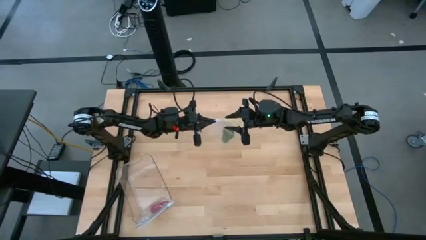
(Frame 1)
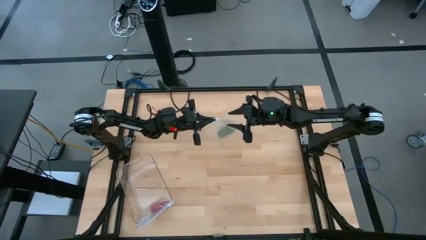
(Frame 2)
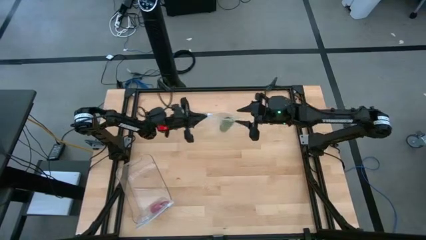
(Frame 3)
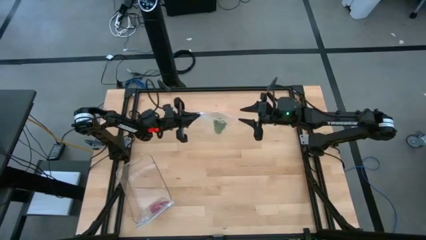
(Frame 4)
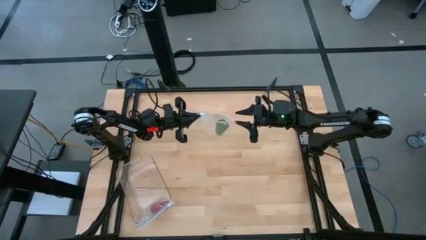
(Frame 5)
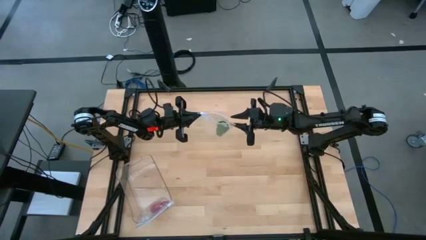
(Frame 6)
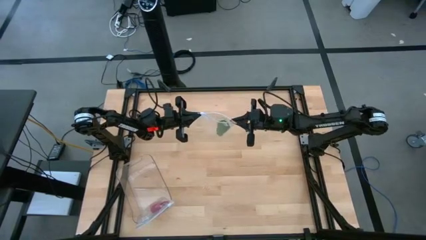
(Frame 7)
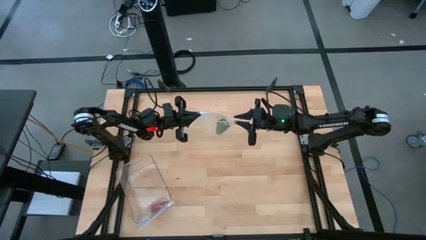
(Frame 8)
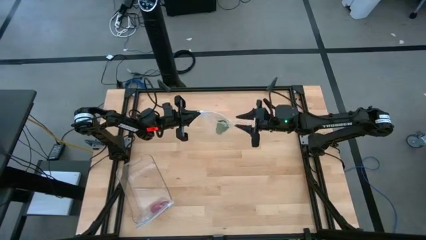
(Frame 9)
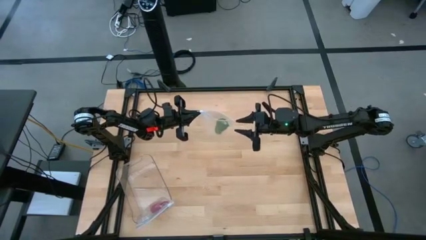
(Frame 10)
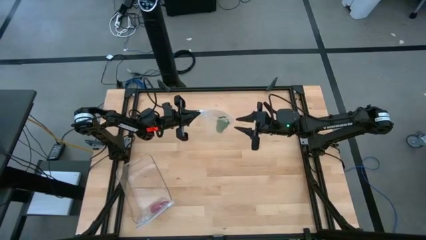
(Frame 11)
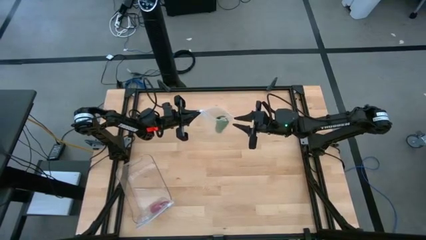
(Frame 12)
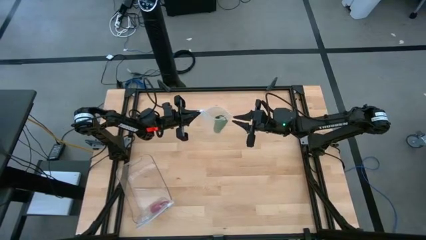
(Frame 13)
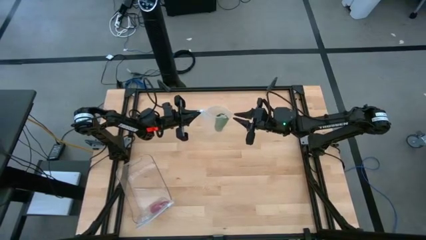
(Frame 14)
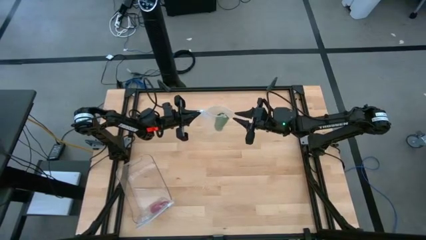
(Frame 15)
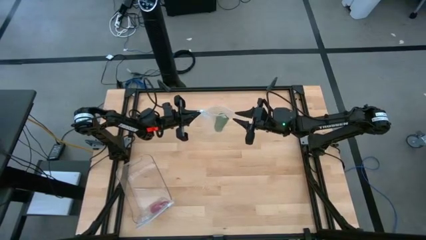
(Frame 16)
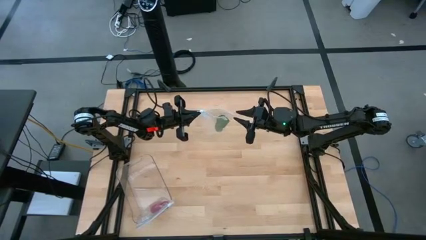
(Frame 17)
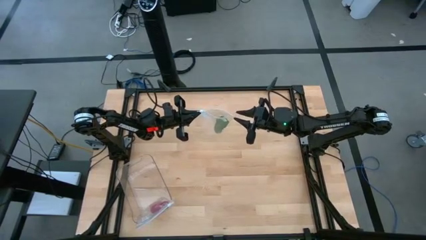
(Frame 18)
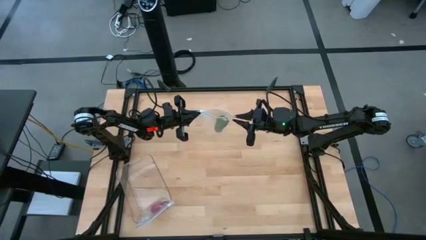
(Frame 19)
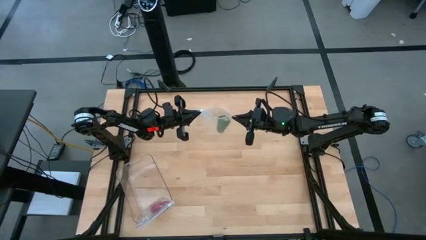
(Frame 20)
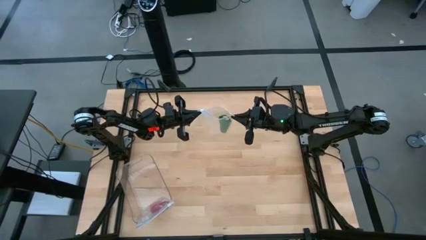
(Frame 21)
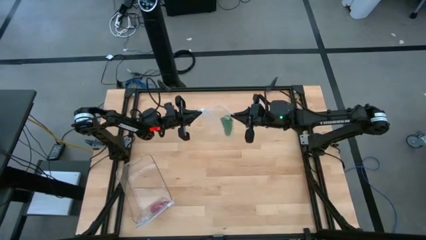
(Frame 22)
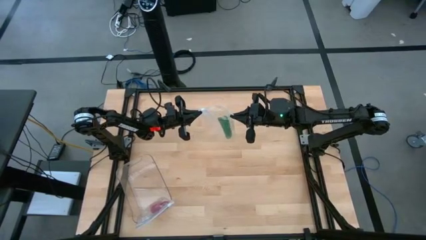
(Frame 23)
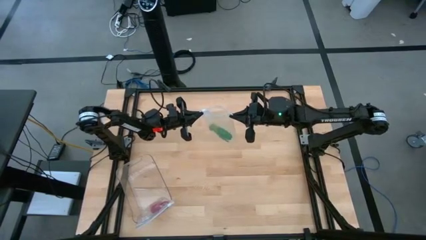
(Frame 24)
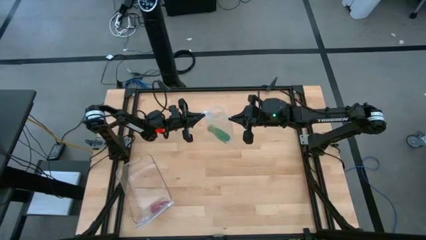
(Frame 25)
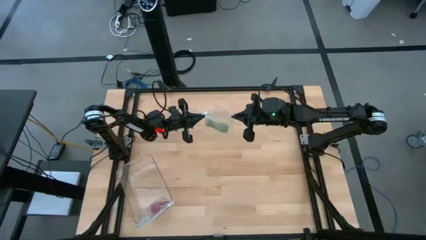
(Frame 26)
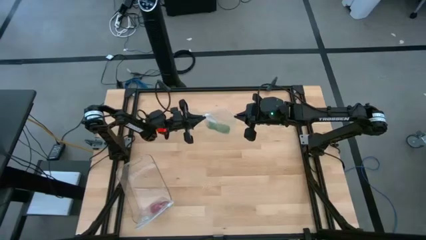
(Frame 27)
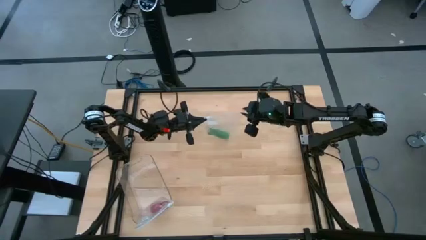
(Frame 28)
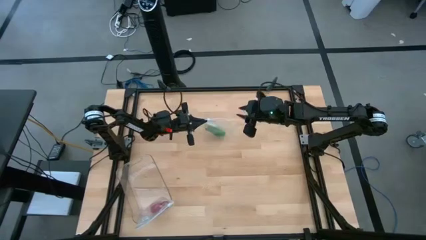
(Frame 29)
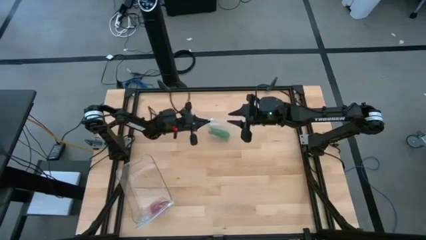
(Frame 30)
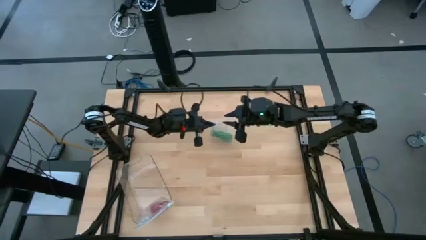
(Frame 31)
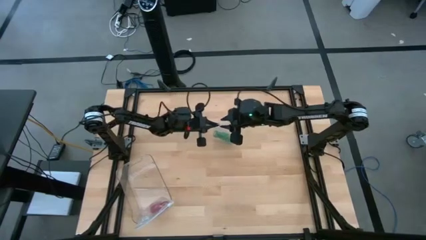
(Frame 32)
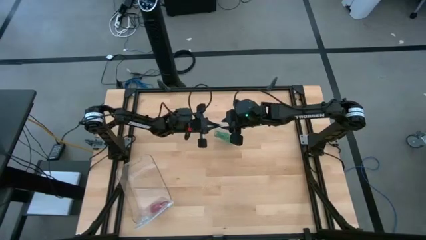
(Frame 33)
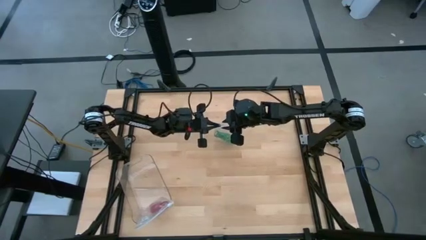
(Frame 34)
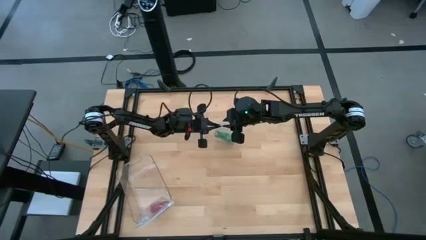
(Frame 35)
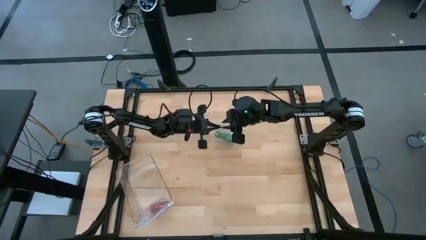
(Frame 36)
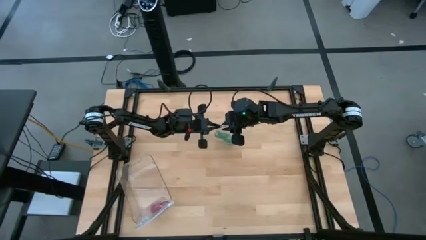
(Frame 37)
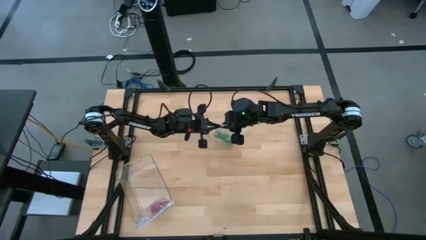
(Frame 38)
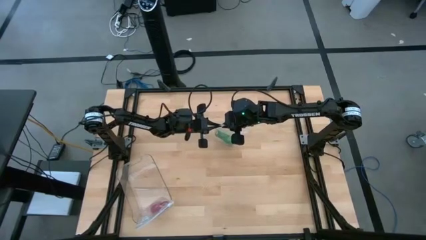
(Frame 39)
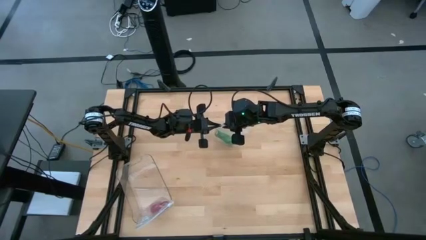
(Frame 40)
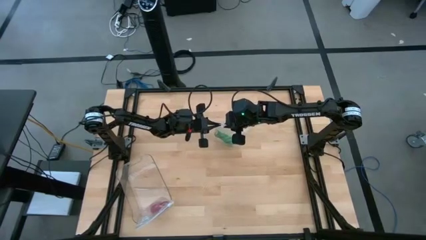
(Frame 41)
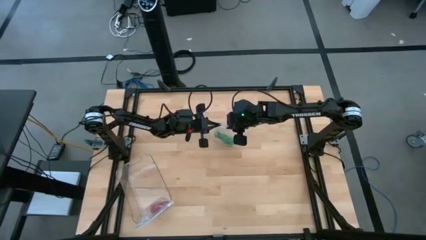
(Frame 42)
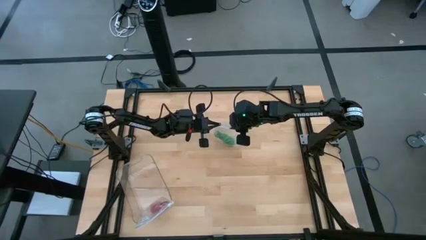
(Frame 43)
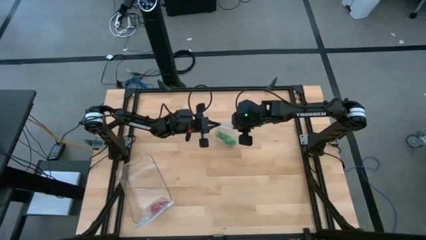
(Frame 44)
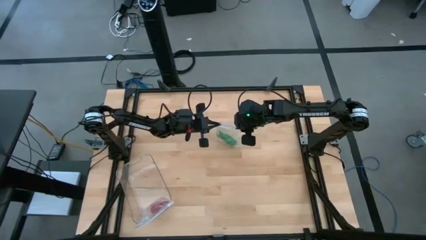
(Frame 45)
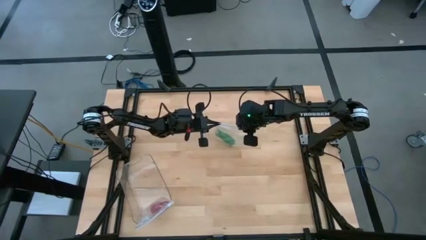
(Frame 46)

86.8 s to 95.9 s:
Task: Roll bandage
Close the transparent zip bag

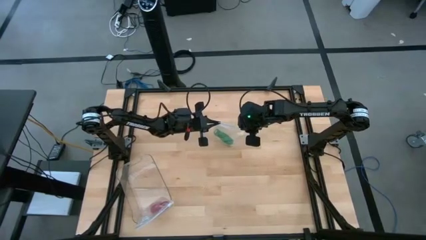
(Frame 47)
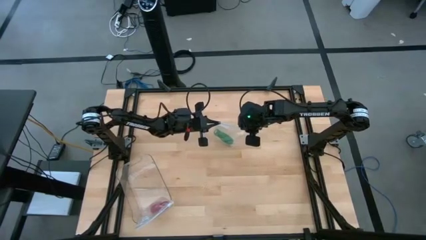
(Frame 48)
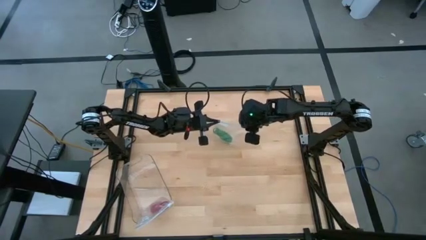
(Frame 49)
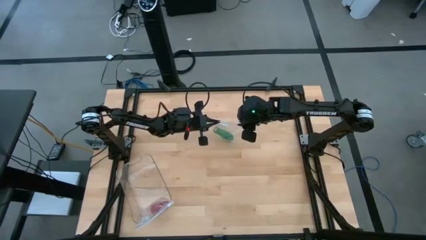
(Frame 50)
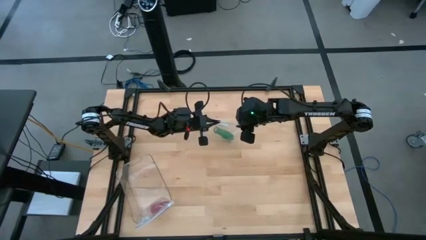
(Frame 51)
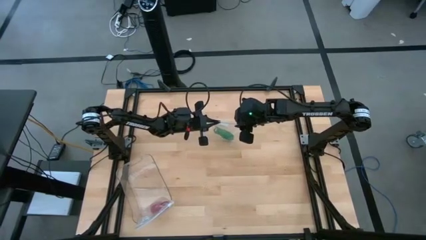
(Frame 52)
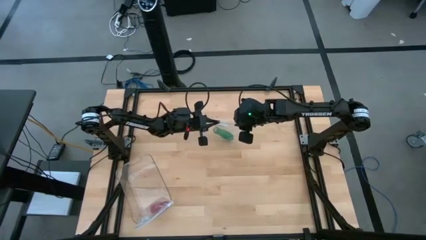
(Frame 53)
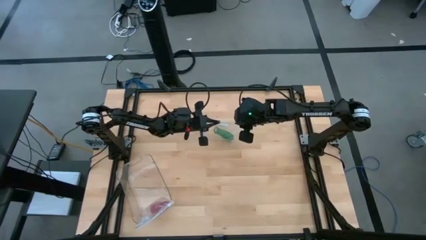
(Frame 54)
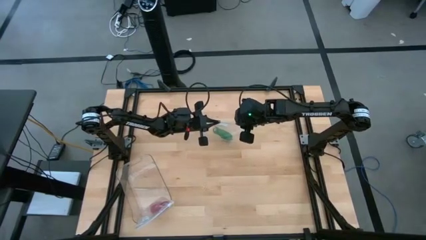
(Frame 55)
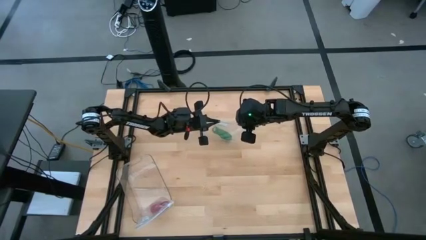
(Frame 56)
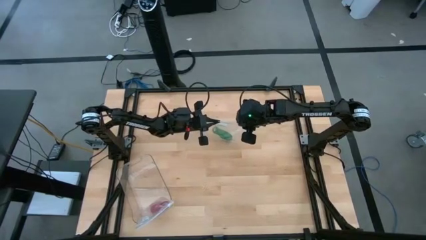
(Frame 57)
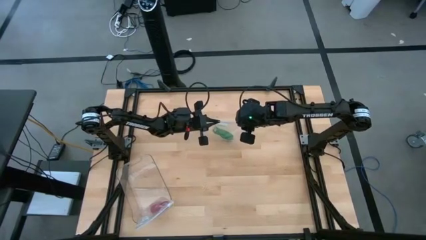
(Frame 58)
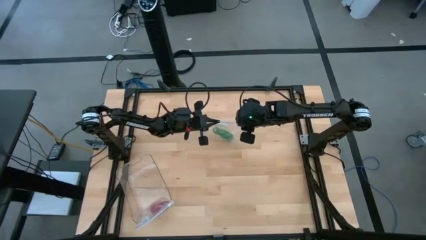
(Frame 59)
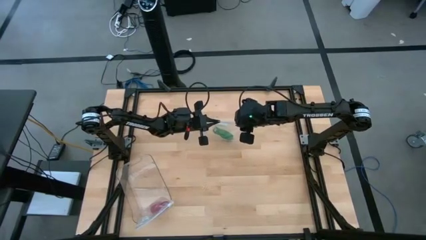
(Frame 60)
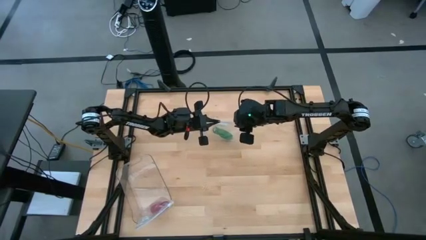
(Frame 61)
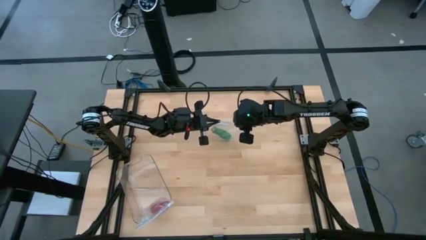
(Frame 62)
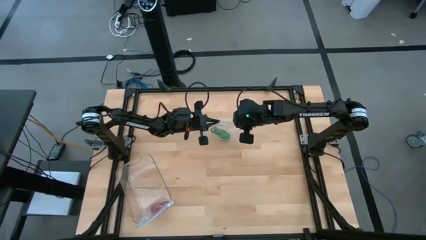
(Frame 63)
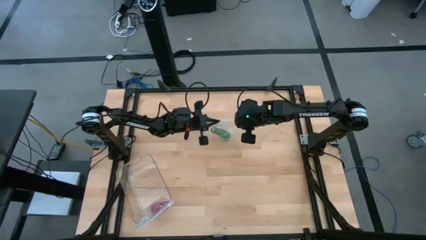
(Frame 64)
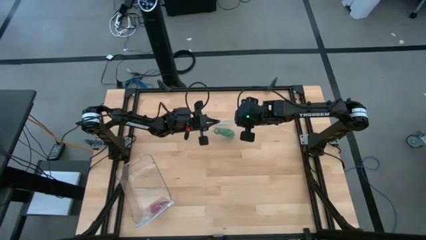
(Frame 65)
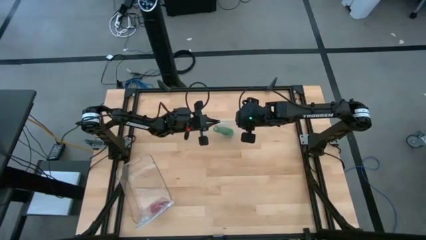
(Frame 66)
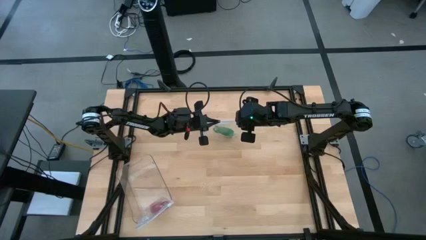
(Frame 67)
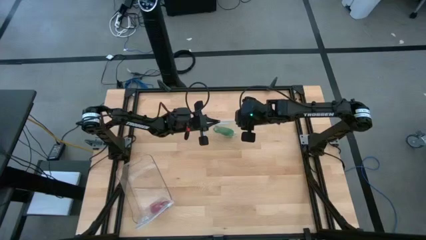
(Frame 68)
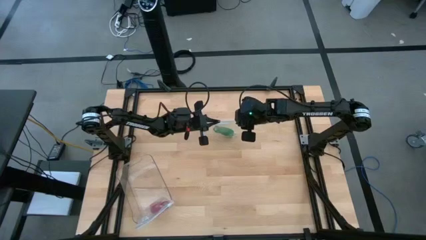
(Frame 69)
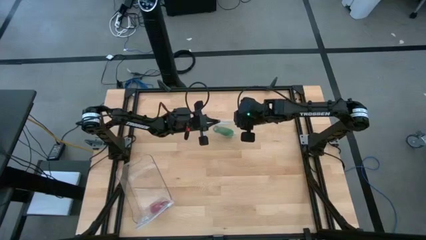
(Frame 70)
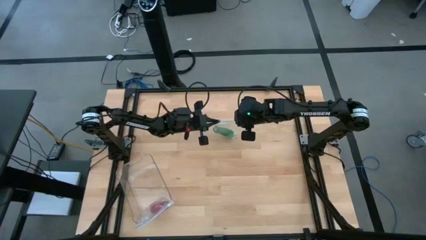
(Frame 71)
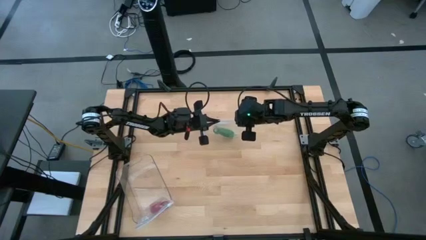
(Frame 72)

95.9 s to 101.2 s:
Close the transparent zip bag

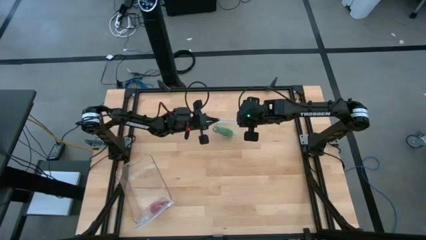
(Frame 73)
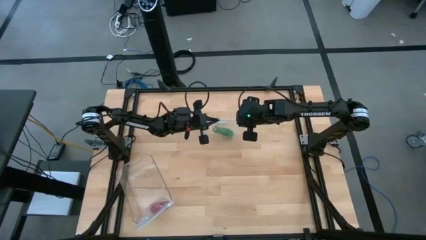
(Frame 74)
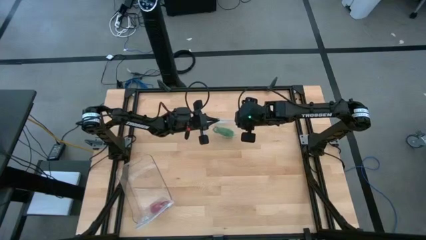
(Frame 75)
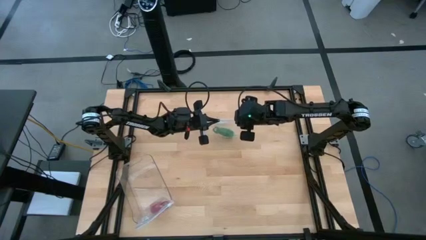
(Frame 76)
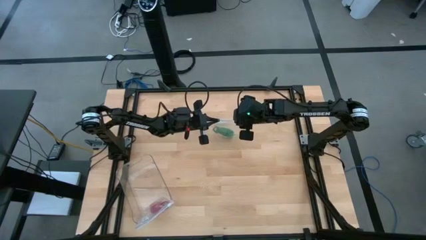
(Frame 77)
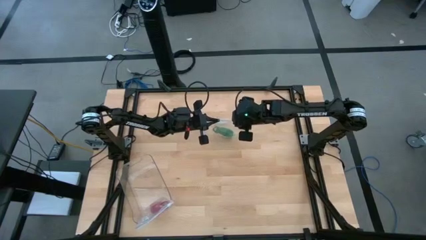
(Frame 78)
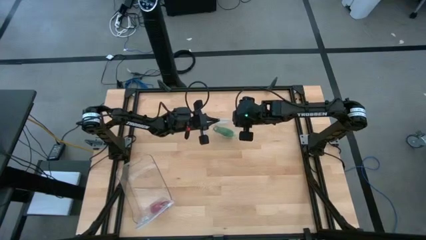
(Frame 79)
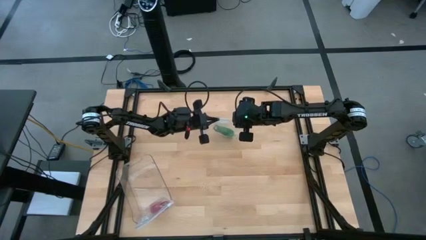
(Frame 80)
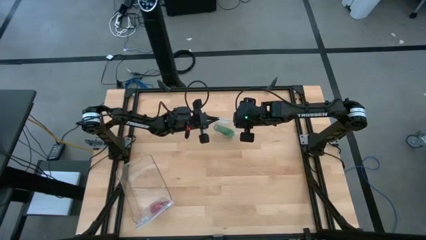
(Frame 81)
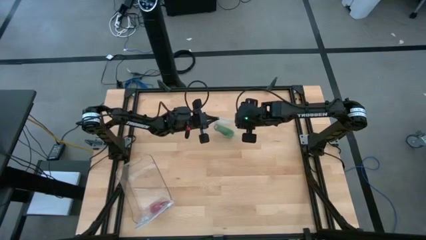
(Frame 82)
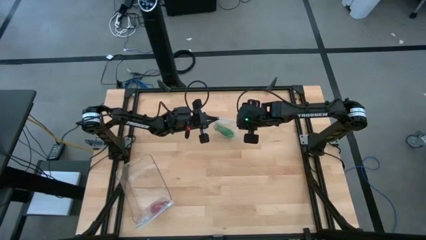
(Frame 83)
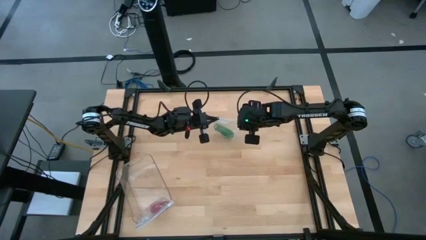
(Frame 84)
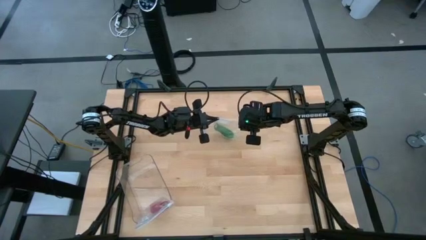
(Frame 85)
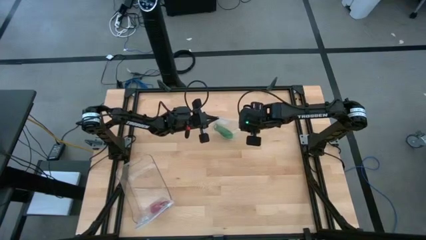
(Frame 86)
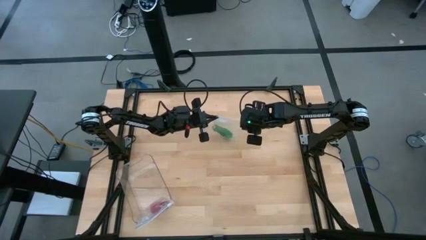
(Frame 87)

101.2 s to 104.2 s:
Close the transparent zip bag
